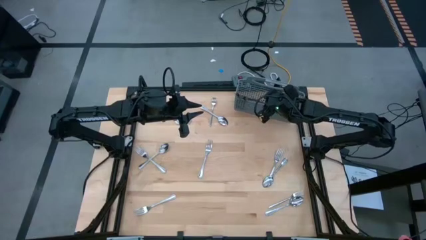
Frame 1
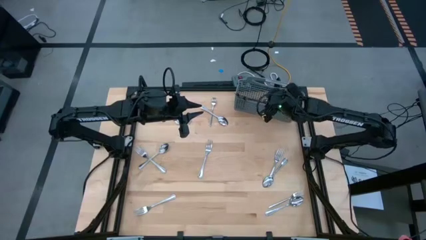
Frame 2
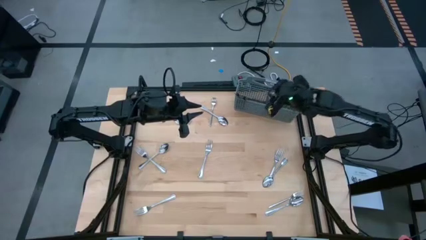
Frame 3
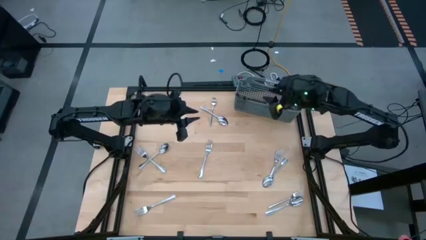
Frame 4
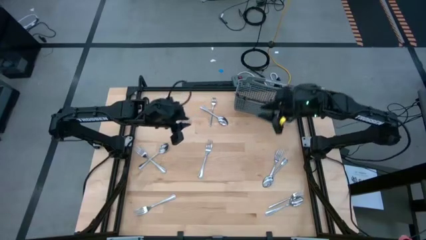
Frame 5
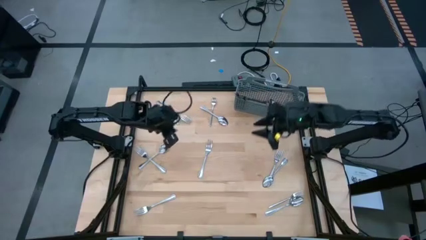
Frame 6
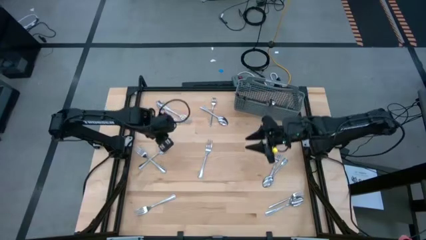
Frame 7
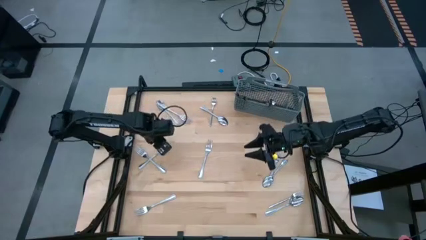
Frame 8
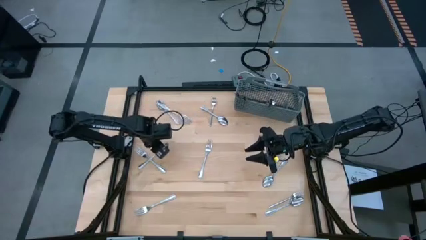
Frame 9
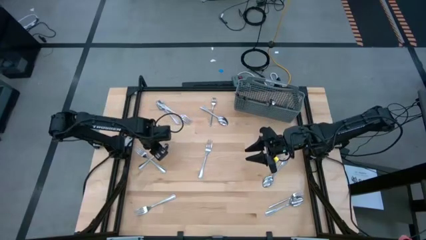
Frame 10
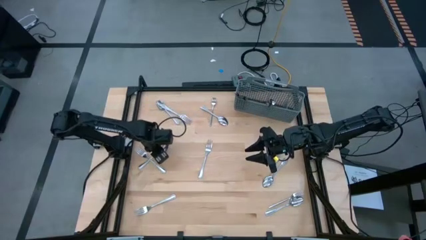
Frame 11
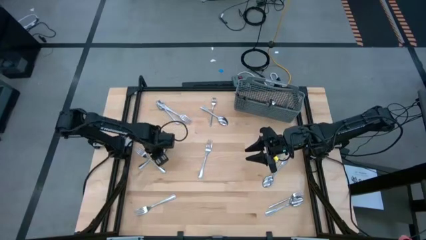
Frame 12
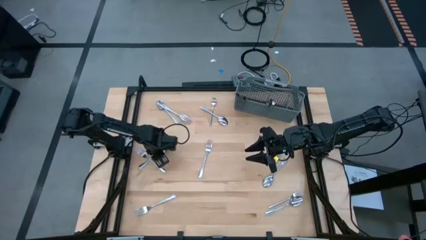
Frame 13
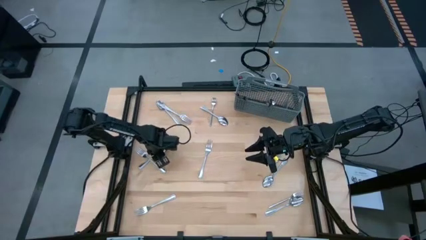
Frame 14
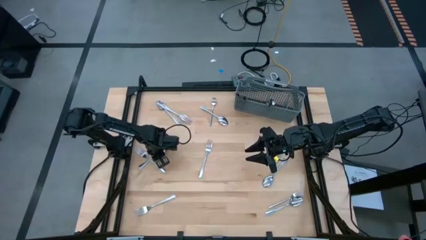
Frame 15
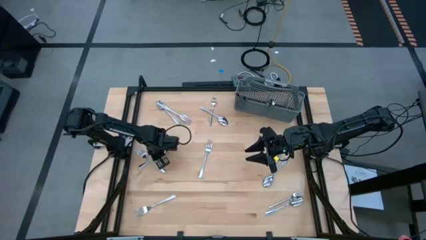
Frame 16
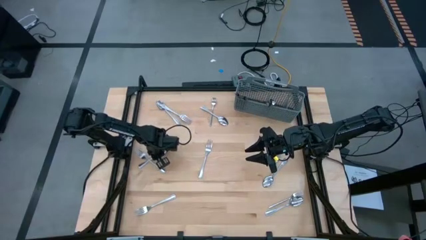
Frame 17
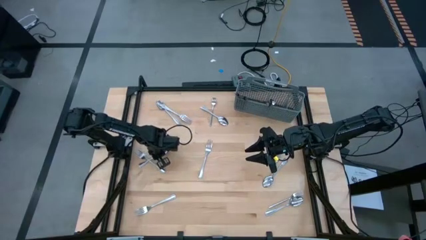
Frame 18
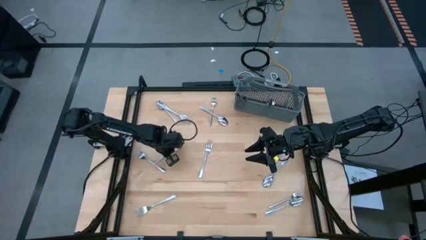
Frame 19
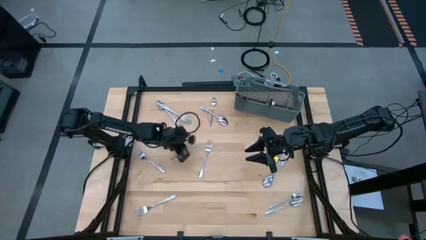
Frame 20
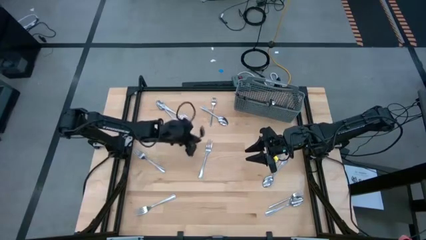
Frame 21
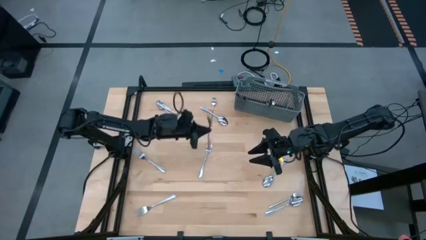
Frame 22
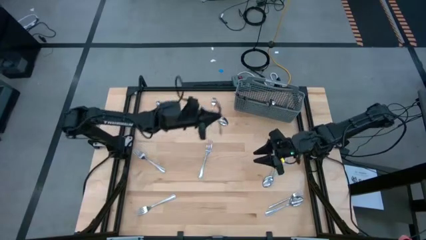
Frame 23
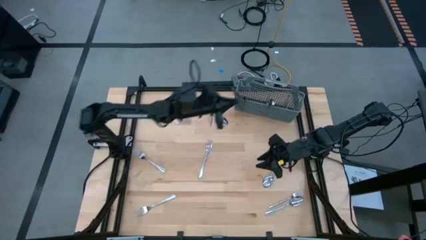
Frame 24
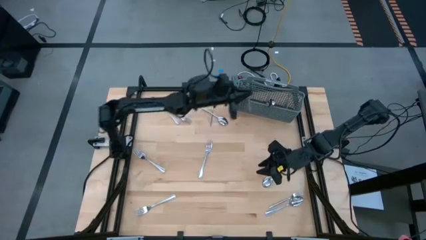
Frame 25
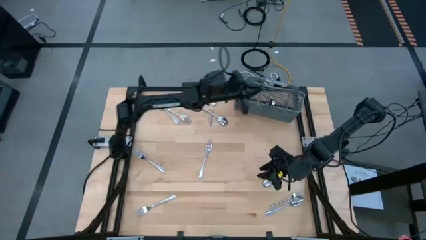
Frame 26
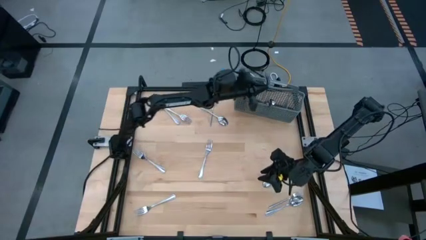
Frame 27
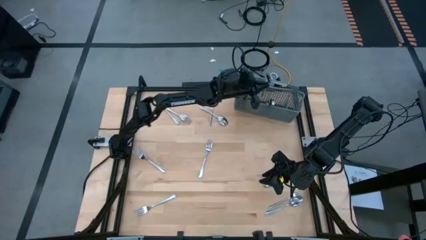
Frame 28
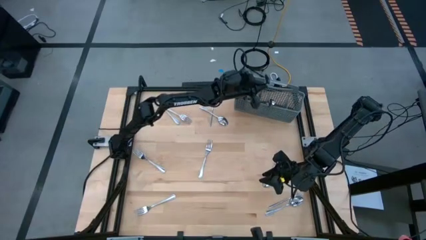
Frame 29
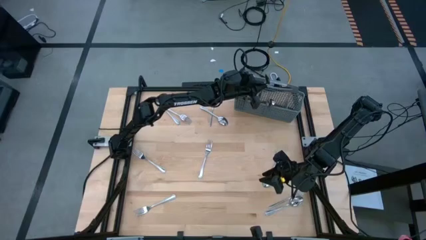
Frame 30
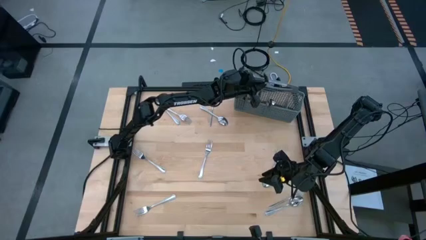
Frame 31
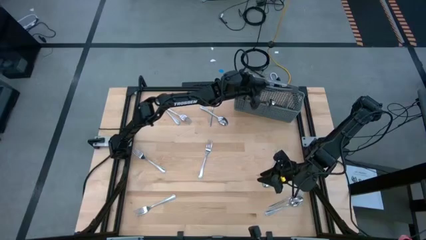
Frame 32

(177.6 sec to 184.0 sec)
Task: Sort silverware
Put the silver spoon into the silverware basket

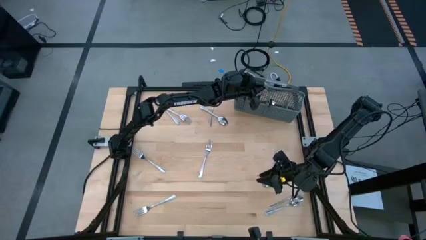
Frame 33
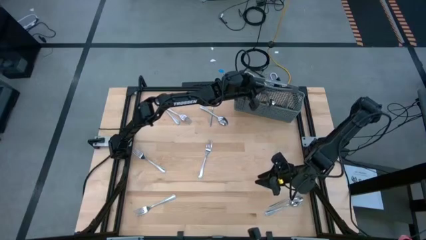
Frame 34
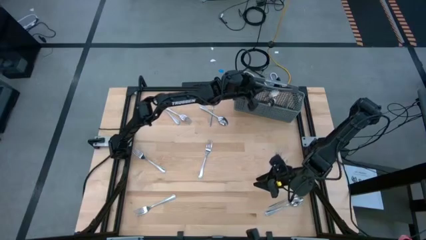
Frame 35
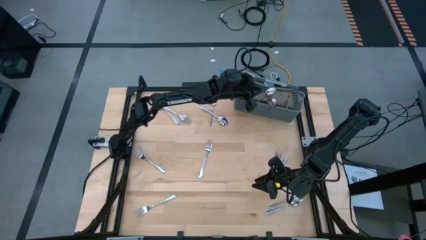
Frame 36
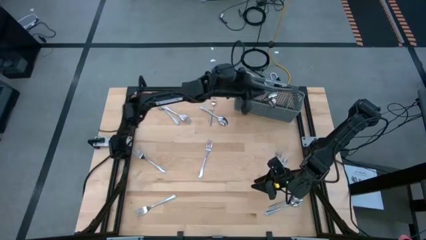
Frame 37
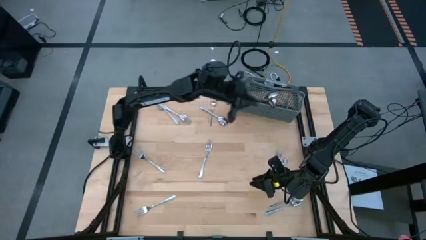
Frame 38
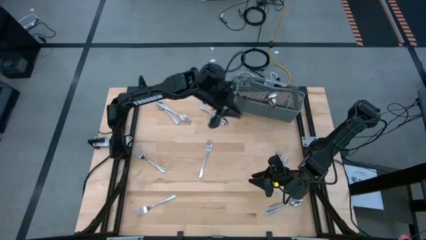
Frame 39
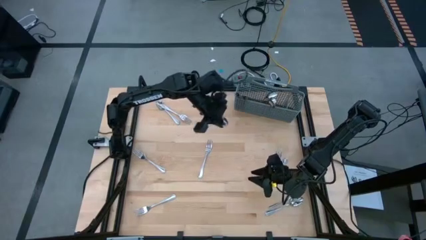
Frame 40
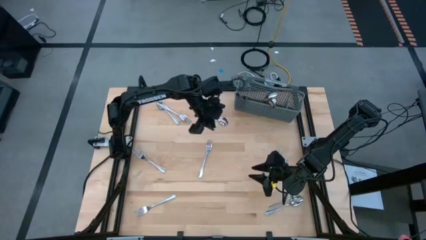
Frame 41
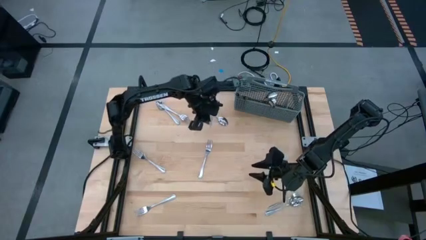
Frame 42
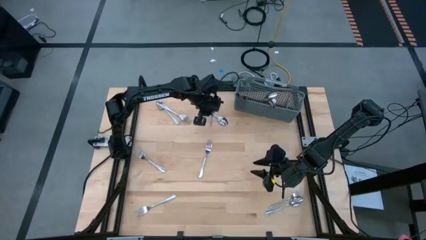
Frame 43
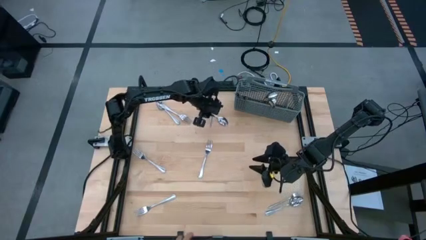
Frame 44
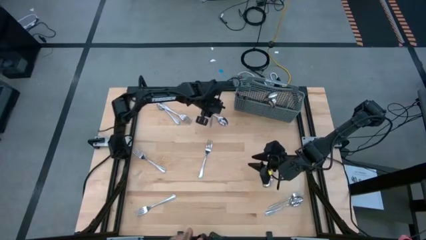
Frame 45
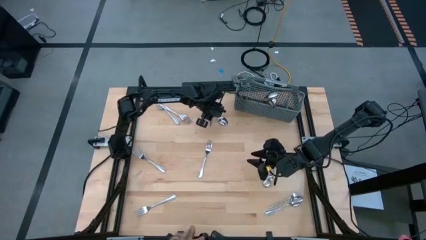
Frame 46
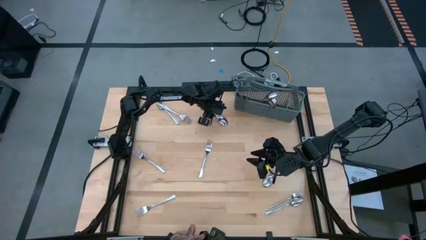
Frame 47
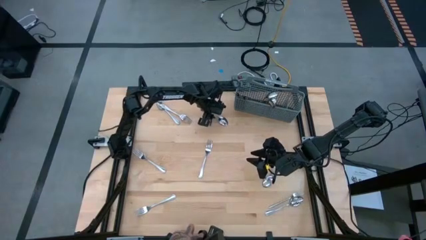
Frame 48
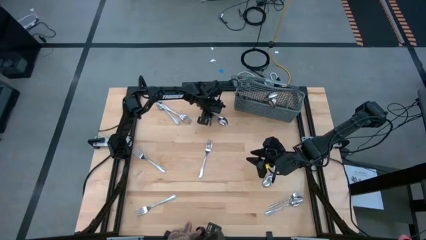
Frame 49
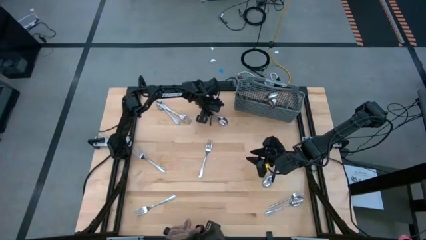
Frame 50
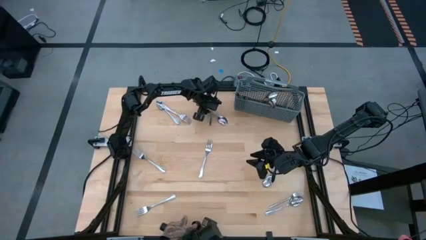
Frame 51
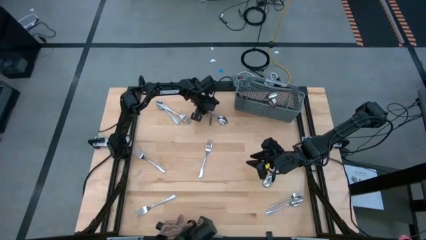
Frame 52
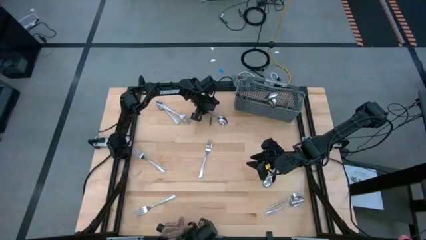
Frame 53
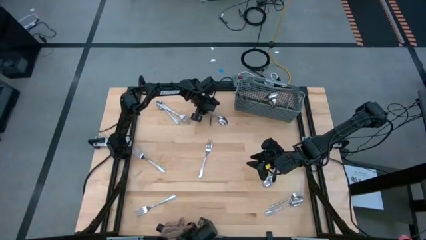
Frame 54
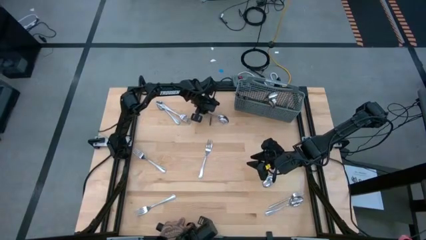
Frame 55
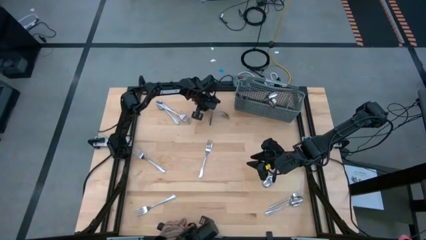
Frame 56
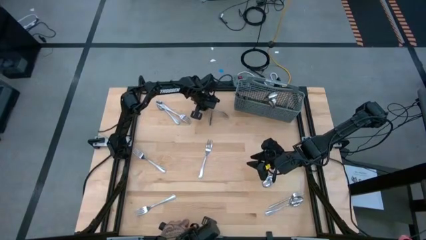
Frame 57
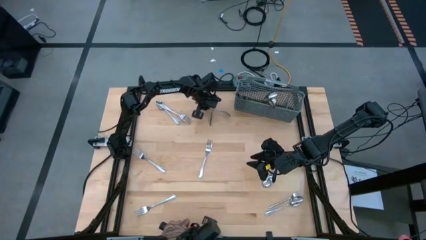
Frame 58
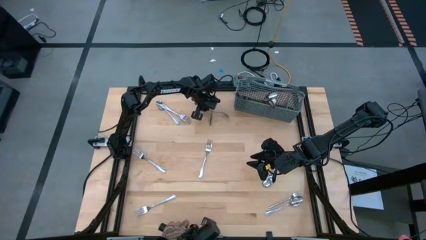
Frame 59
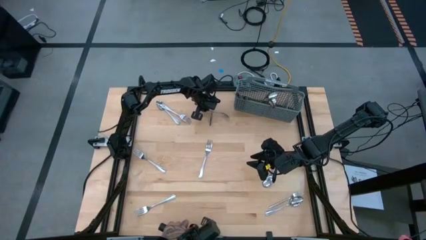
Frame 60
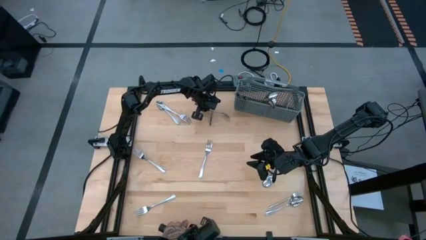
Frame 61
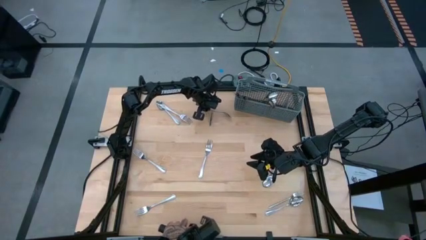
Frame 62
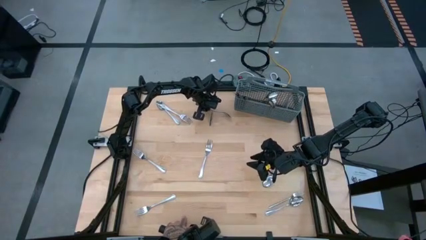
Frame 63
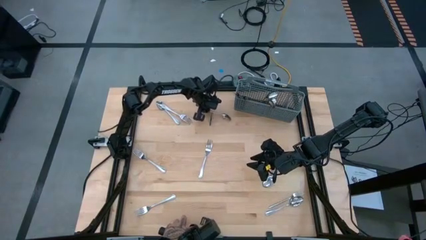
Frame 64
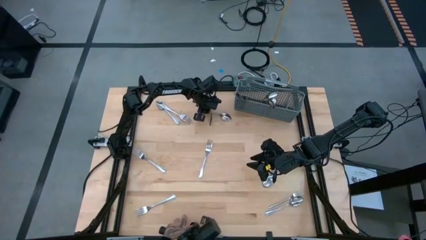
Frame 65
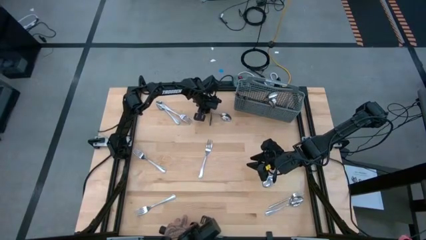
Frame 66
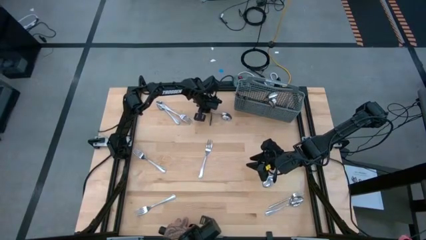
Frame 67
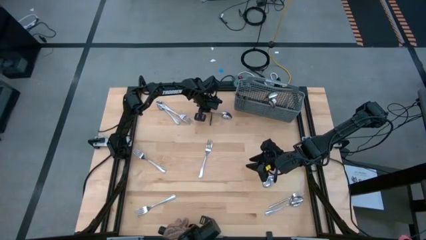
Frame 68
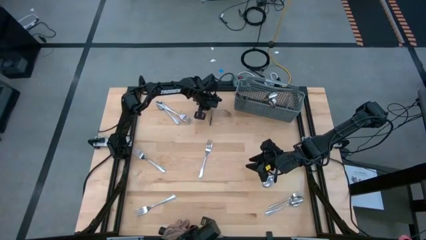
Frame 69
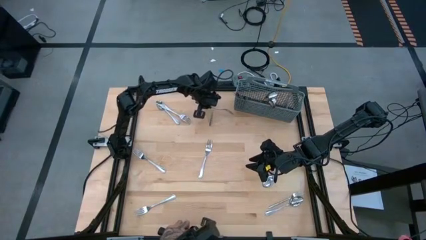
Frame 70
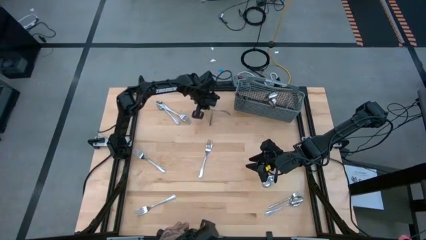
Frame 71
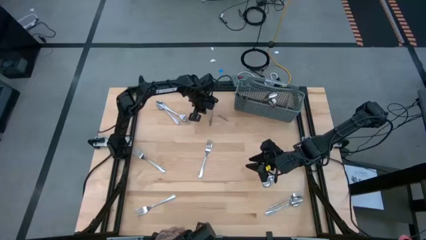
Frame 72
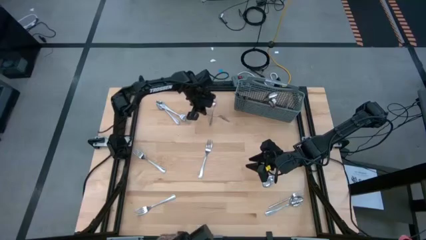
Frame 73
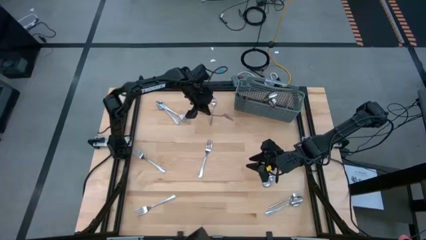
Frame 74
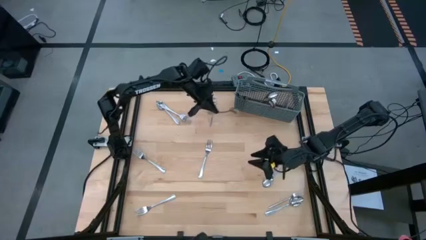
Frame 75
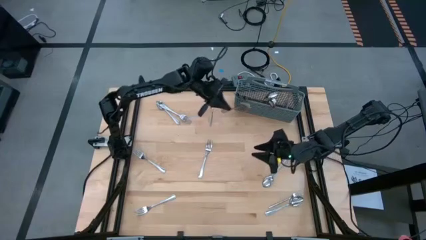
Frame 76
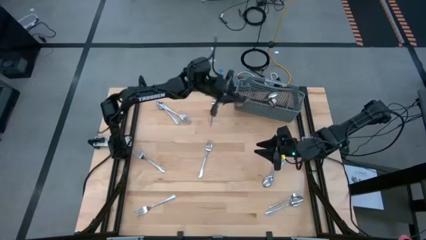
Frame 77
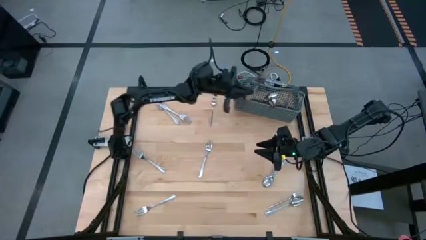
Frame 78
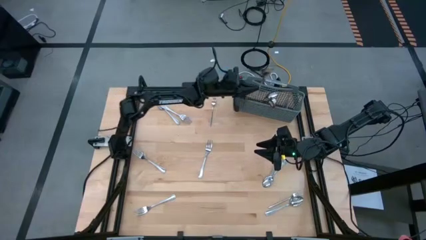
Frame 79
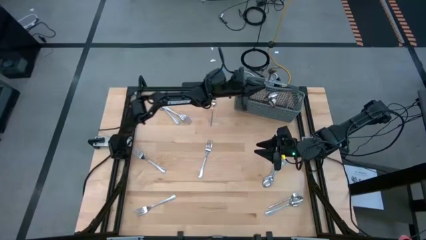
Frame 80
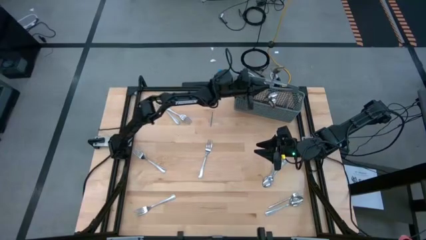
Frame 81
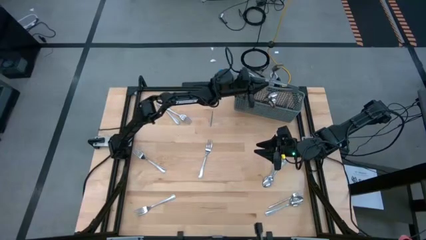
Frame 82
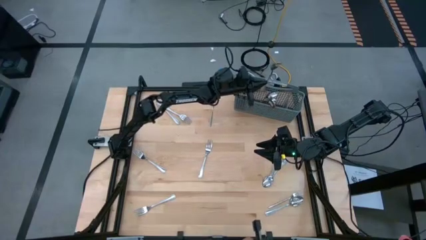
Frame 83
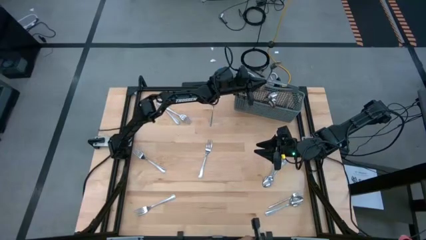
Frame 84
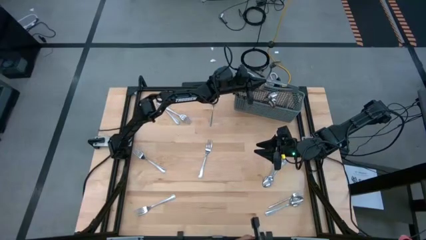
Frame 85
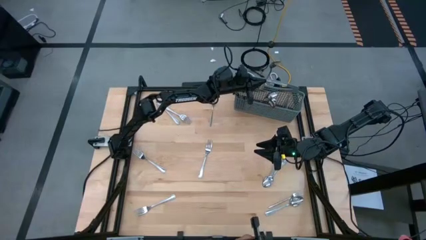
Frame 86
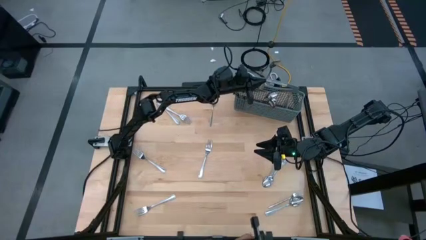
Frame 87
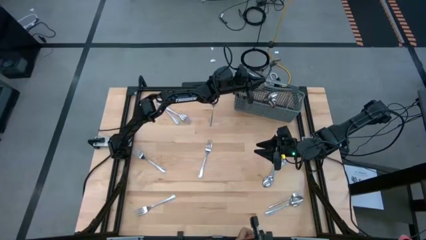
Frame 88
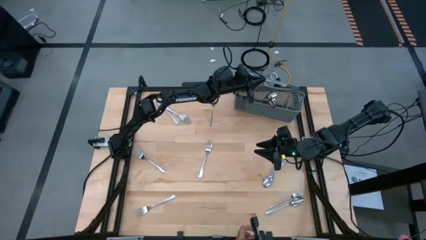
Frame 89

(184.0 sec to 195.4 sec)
Put the silver spoon into the silverware basket
